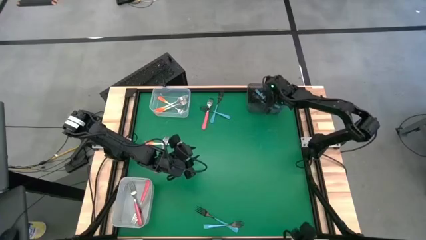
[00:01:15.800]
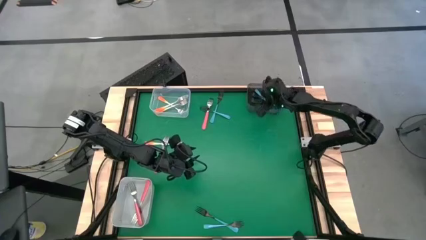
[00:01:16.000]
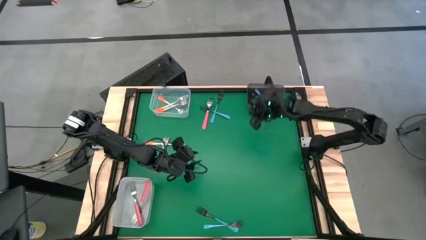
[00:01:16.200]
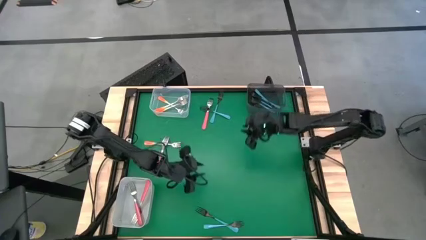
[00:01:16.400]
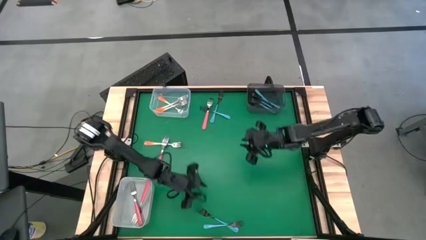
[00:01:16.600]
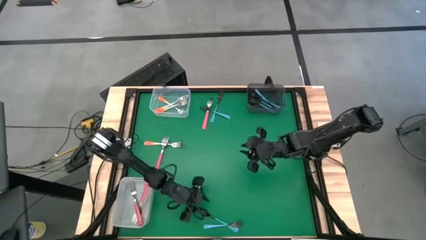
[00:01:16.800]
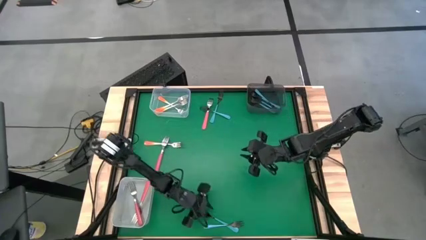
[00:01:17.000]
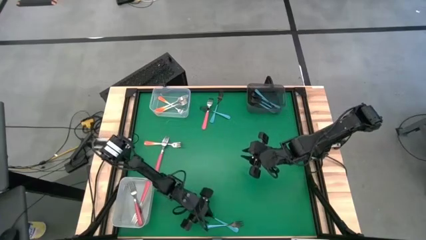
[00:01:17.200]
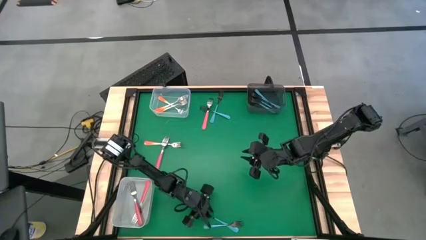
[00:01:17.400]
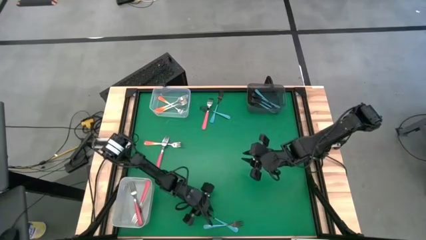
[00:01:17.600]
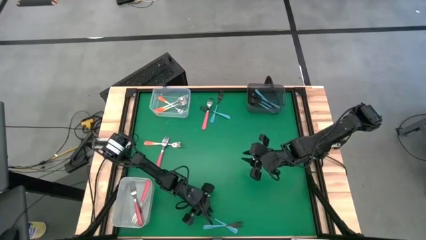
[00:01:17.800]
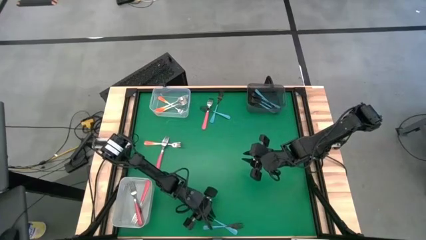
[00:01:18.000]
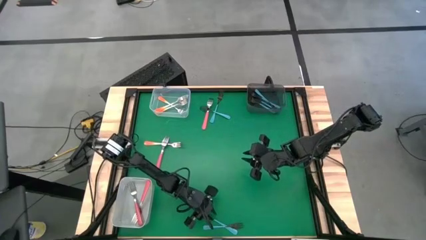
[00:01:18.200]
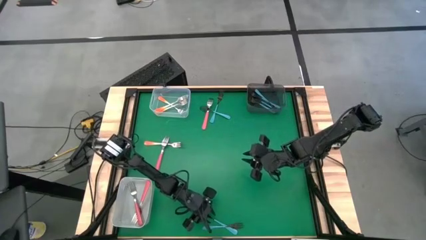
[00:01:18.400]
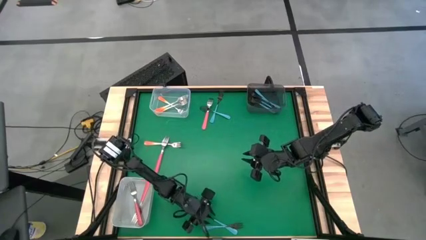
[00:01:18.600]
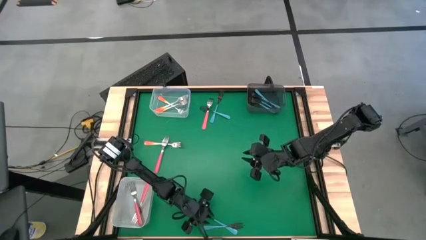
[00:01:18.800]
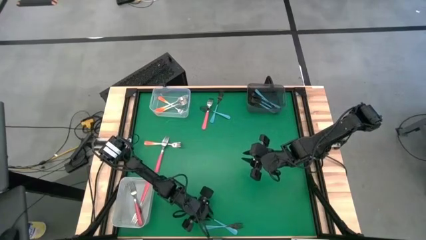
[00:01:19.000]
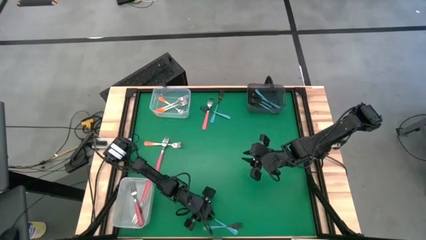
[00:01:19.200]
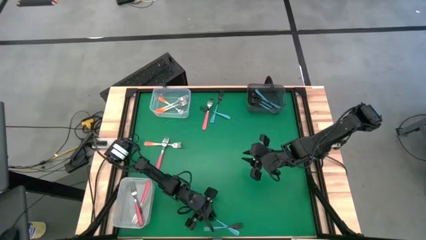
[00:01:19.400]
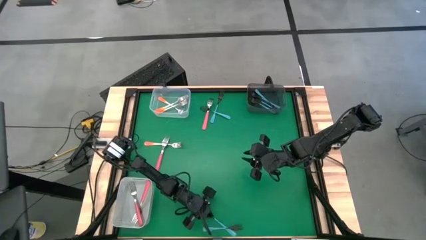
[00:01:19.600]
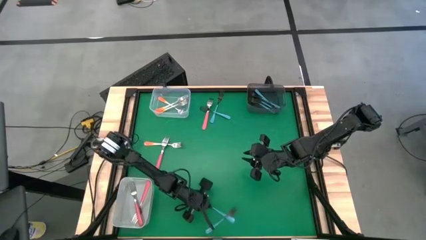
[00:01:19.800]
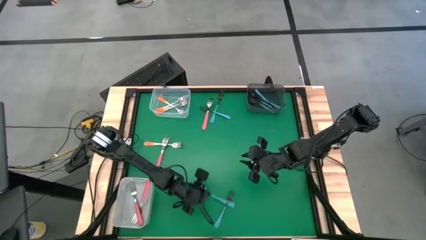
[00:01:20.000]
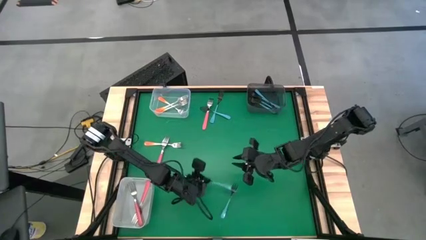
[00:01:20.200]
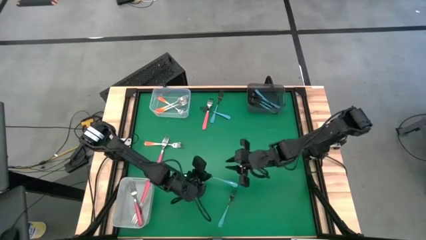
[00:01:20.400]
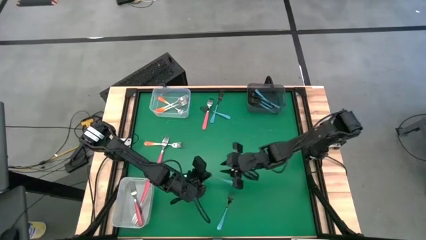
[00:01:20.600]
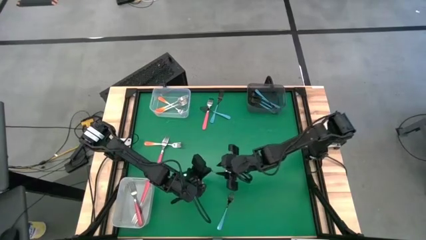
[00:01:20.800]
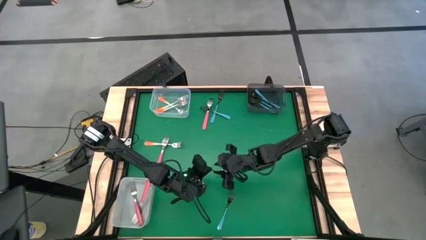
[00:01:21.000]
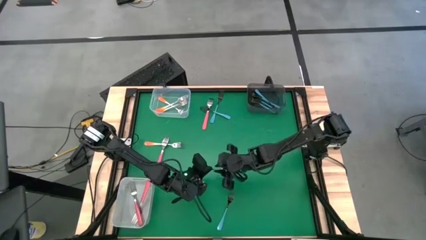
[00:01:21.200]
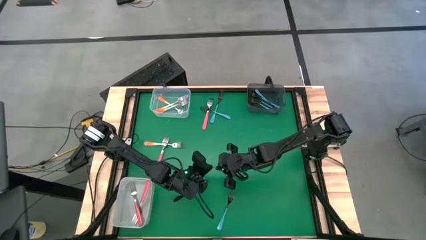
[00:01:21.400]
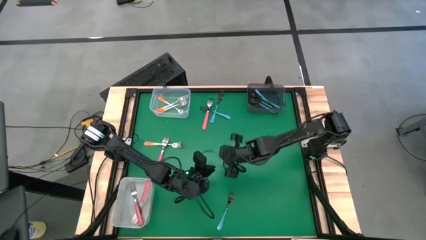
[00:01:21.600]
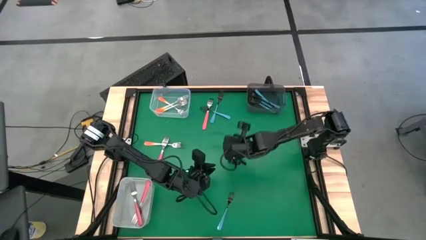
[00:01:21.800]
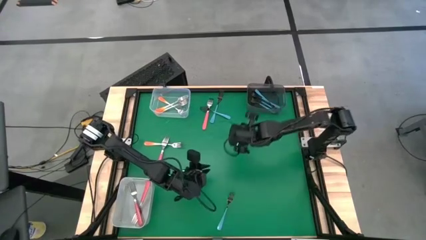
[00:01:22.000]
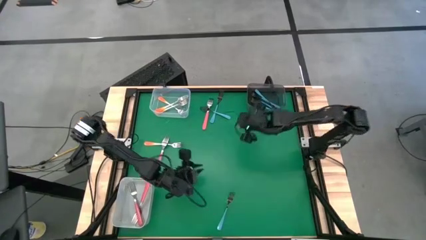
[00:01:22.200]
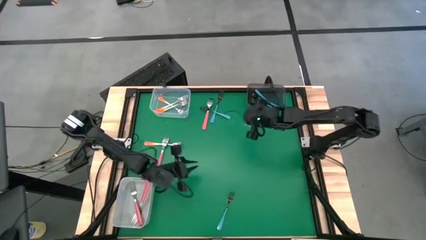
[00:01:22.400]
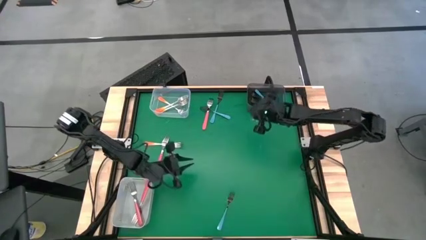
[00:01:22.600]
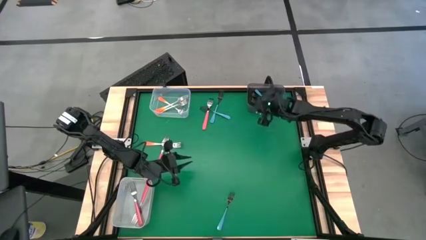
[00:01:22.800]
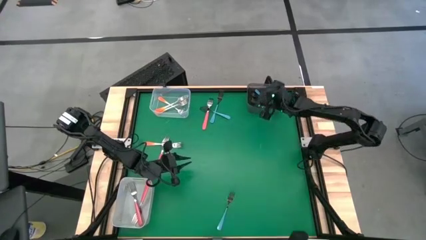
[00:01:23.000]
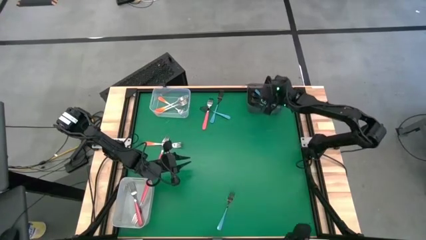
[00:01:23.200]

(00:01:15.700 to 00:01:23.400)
Task: Sort silverware by color (type)
Put the blue fork into the black bin

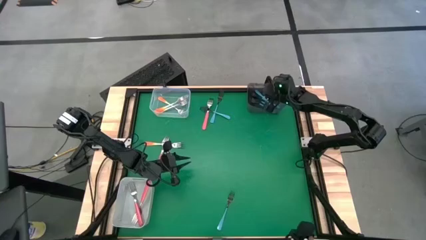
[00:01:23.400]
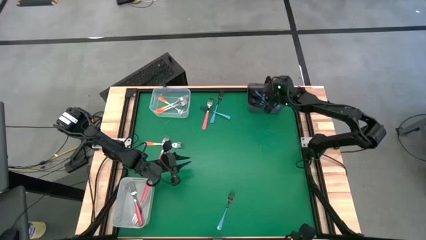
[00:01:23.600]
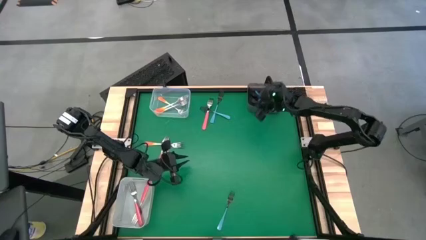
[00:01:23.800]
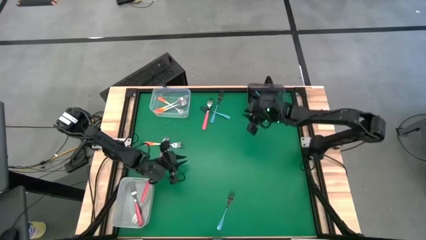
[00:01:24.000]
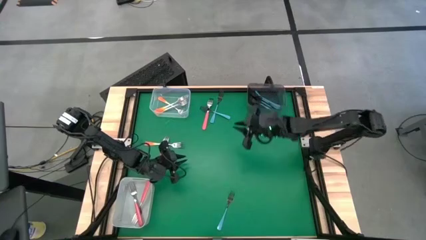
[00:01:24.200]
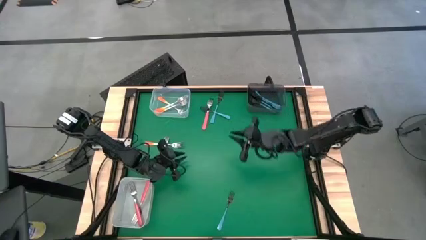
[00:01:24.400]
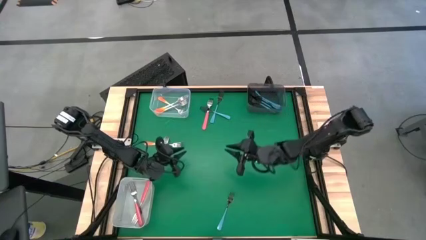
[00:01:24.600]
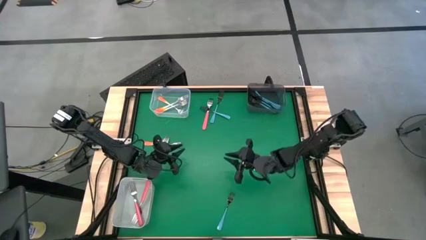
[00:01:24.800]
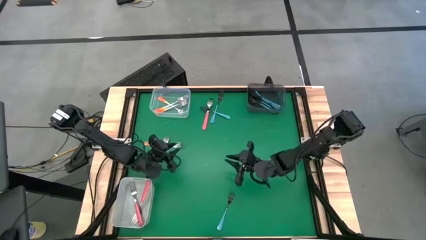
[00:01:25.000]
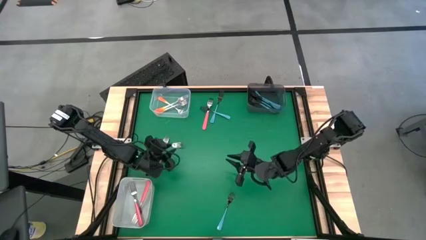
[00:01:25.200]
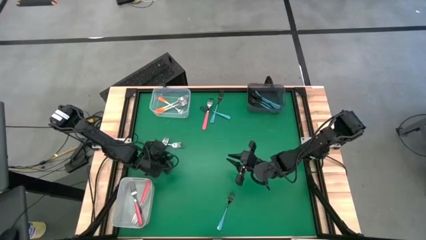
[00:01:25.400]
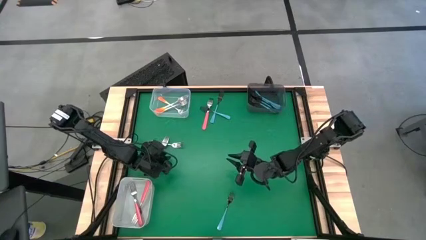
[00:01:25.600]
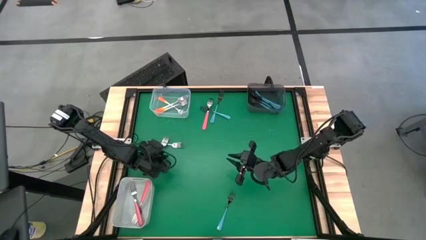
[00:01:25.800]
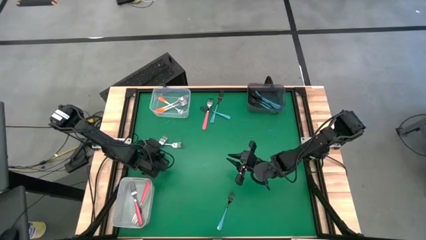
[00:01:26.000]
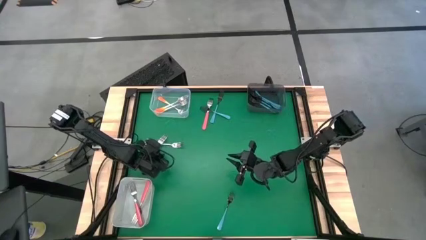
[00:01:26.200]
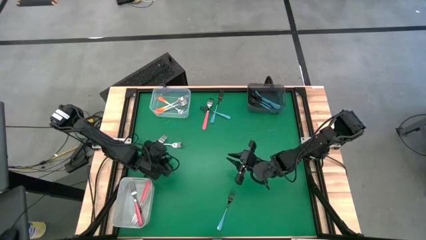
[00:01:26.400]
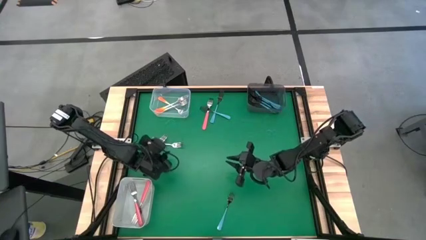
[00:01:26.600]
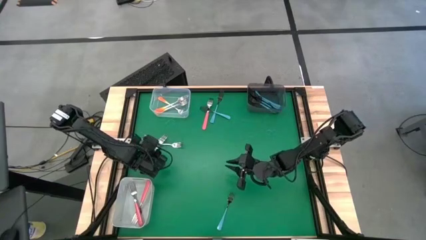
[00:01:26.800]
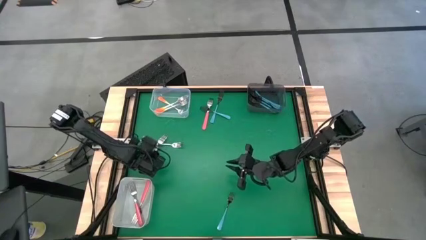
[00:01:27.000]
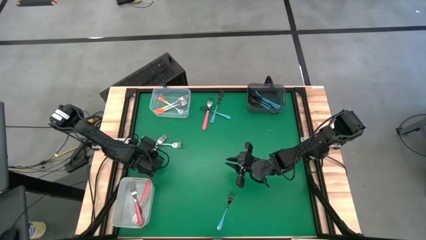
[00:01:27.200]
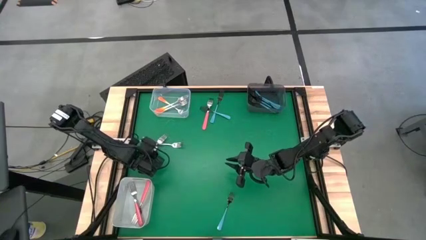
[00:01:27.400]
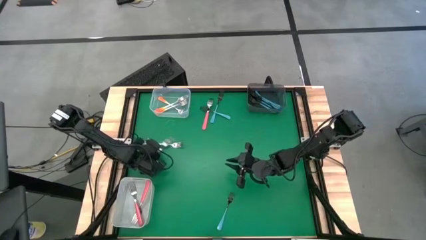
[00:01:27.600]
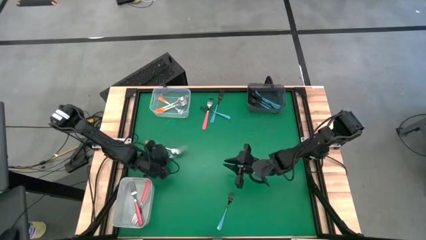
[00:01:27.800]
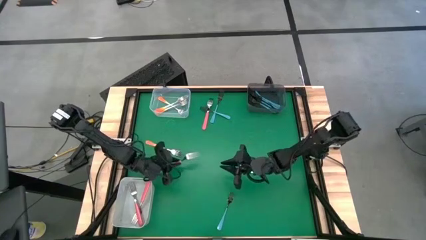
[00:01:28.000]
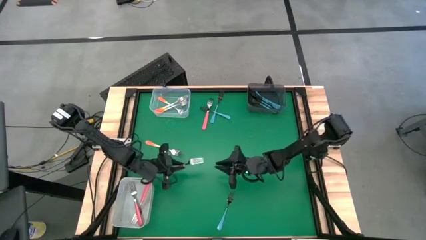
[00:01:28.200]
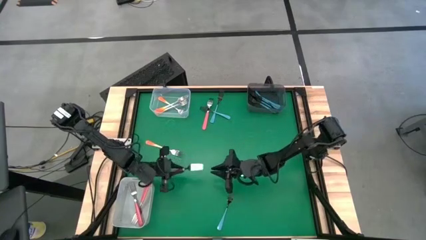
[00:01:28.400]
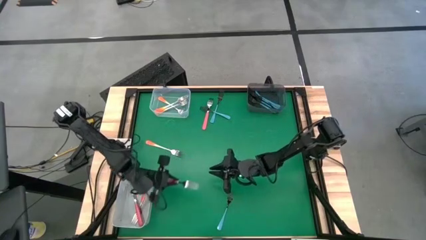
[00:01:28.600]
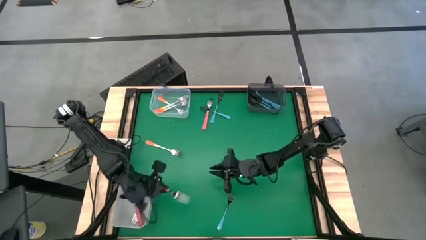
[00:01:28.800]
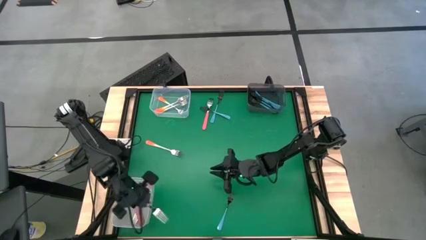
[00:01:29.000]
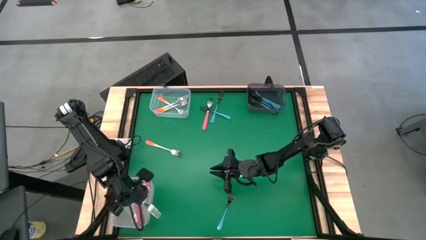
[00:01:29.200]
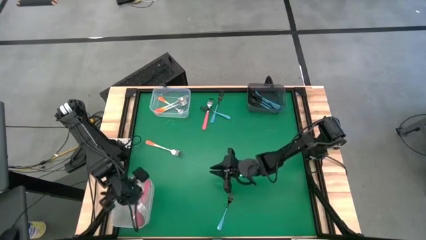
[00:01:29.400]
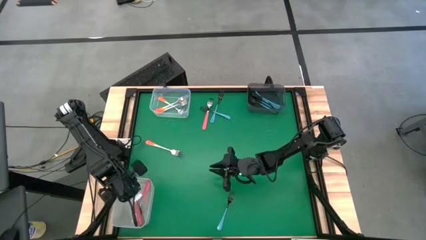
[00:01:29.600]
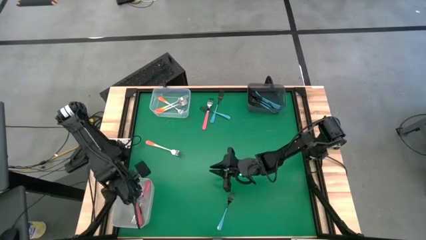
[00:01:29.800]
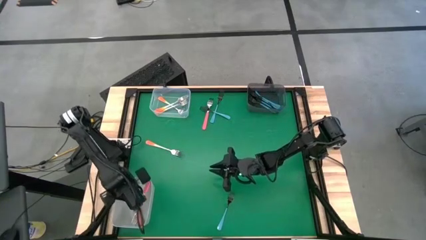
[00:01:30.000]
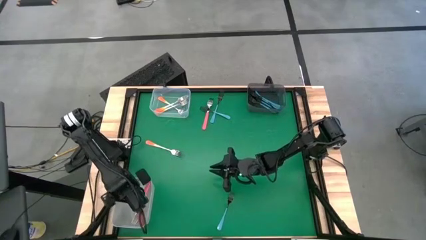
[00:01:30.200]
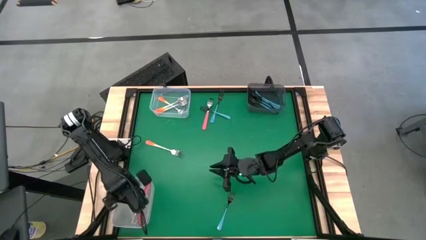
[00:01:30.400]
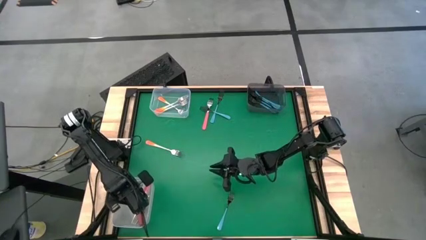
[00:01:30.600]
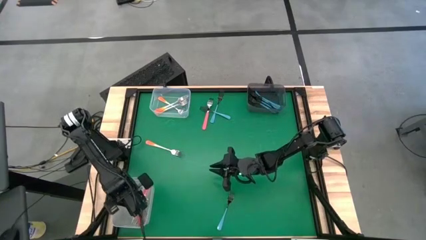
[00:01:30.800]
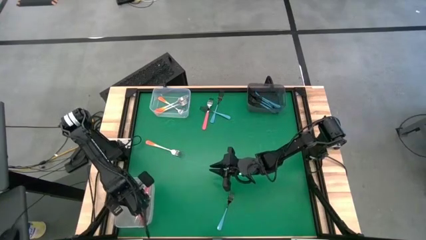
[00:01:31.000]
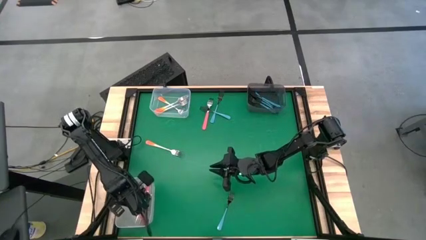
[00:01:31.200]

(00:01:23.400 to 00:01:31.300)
Put the pink fork into the white bin
